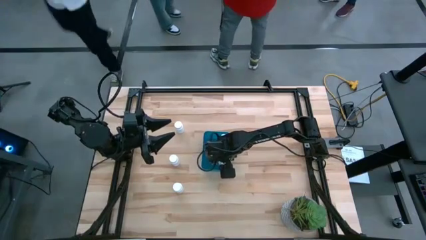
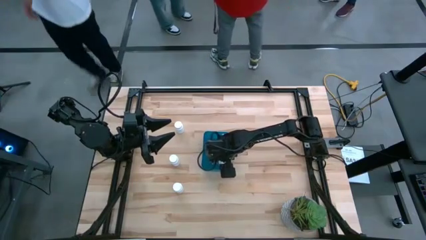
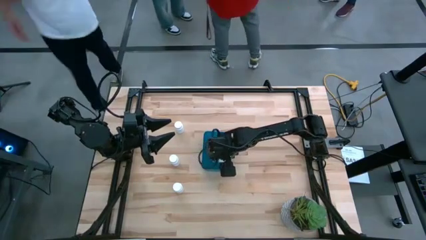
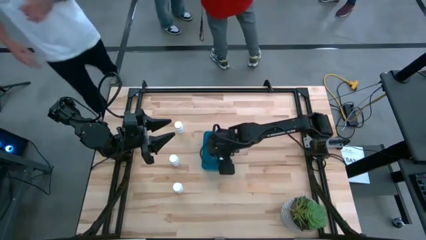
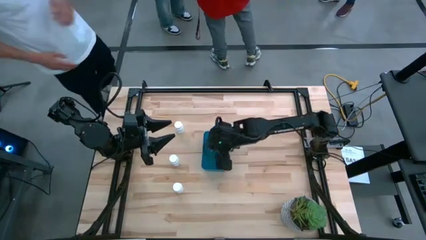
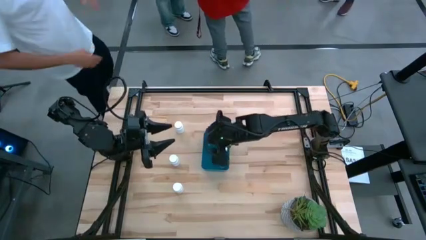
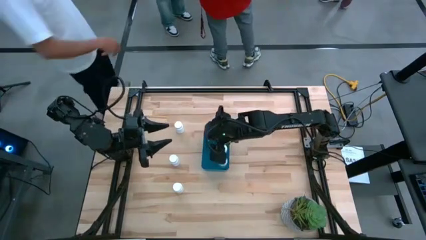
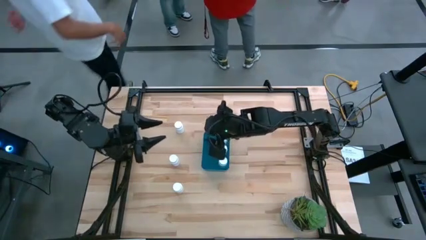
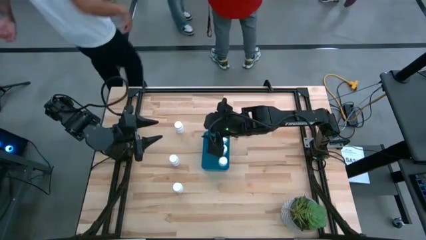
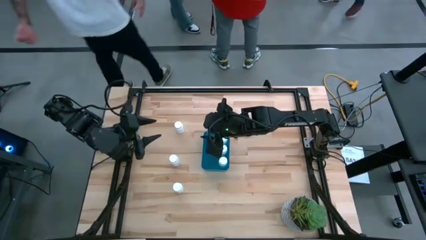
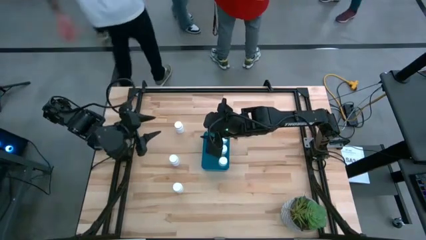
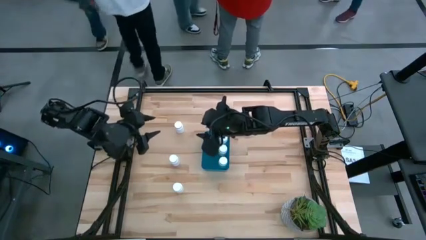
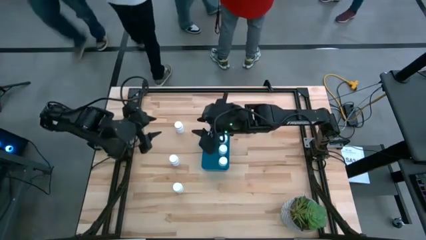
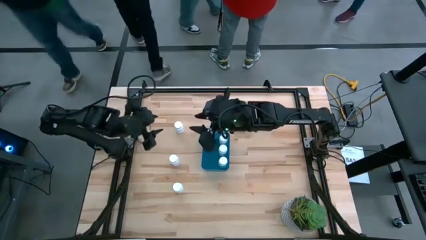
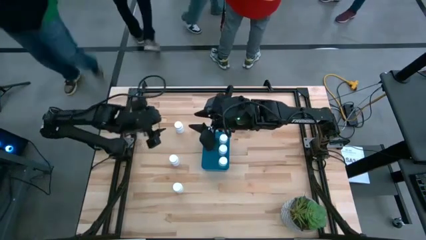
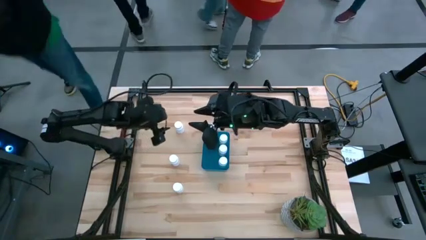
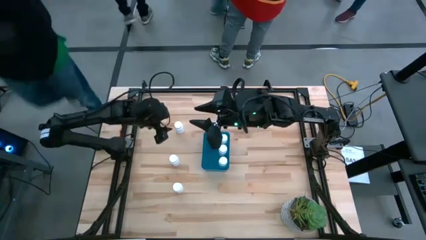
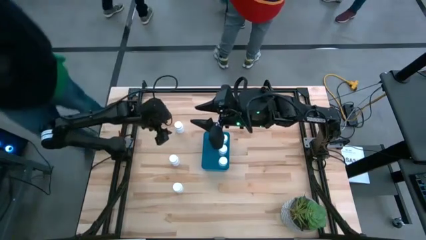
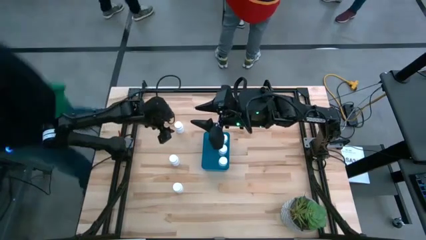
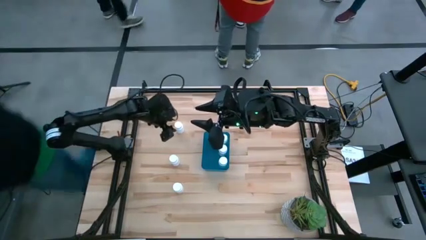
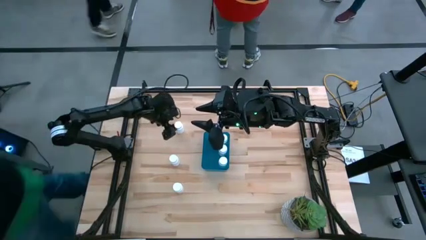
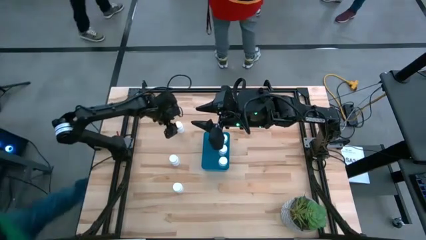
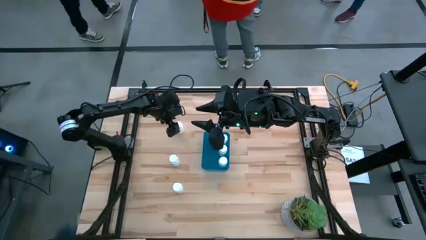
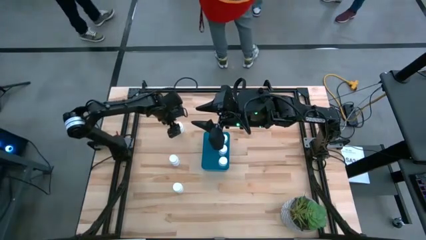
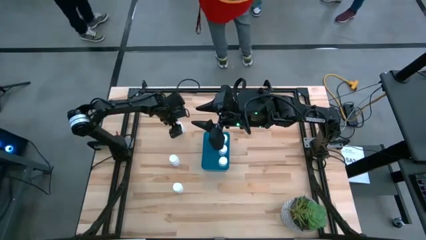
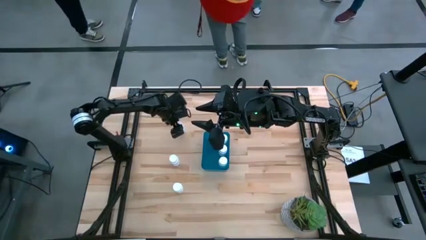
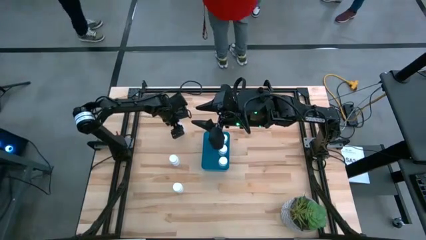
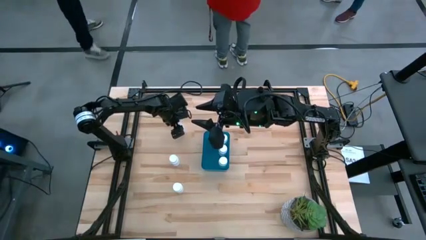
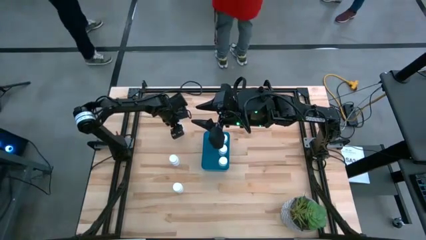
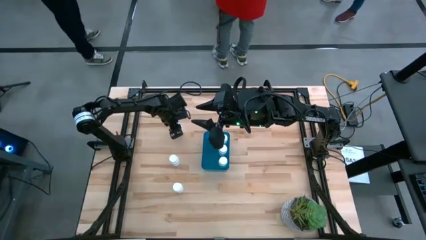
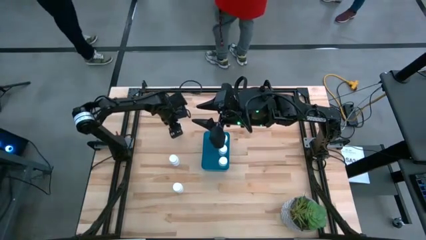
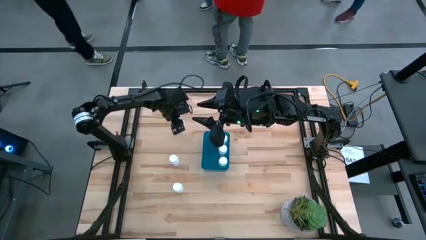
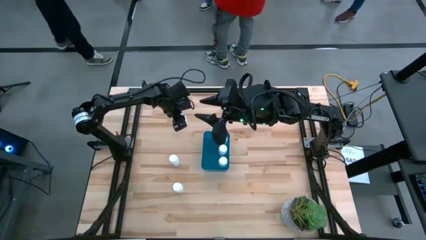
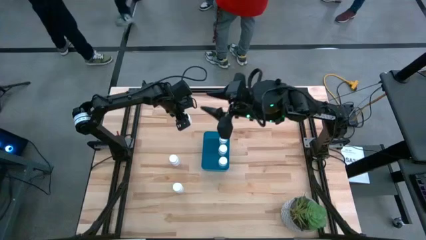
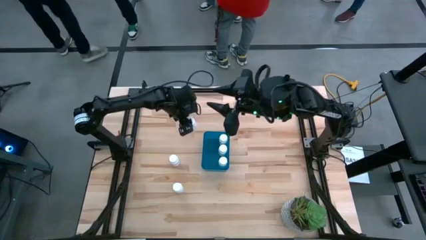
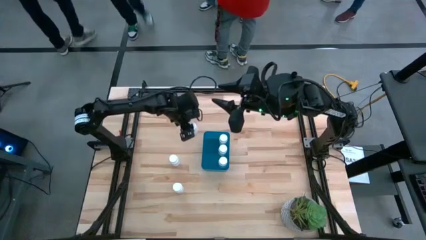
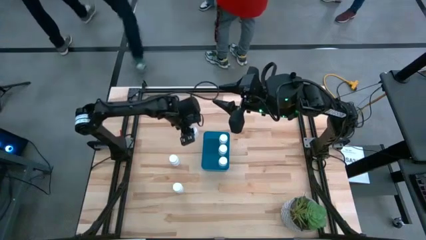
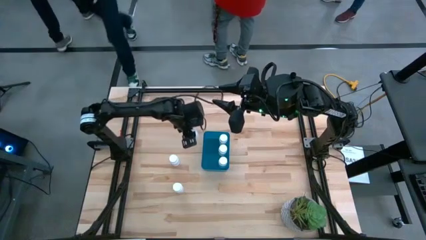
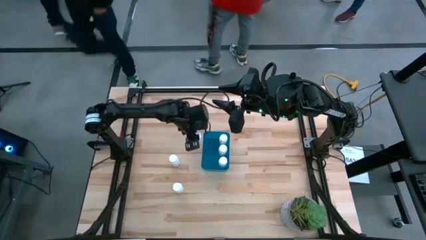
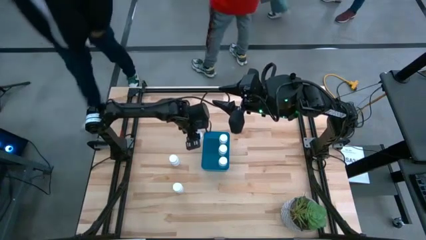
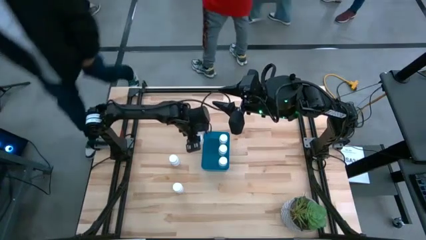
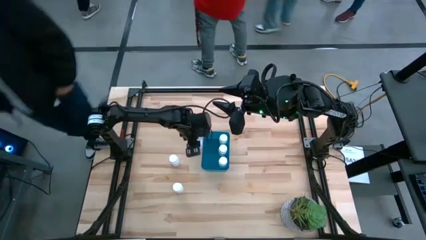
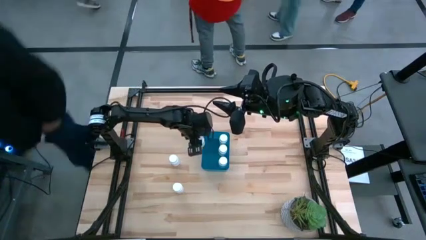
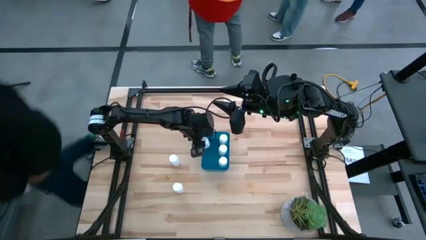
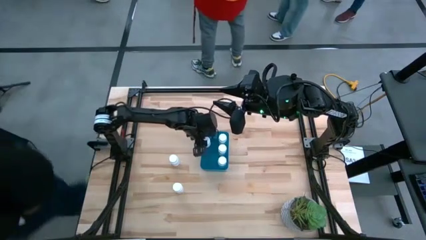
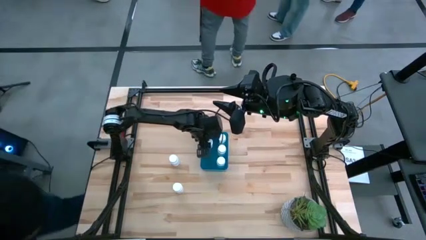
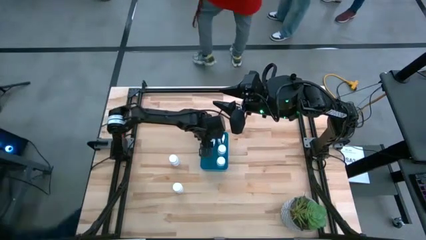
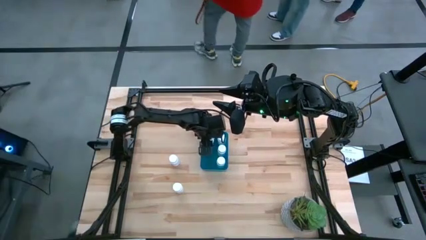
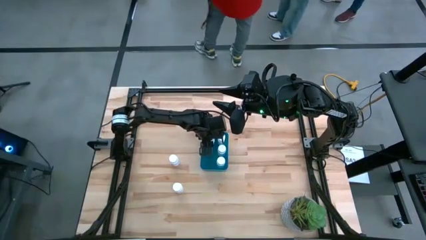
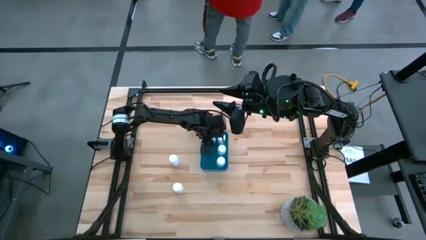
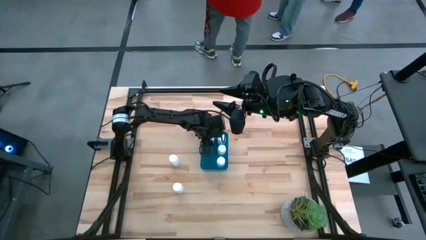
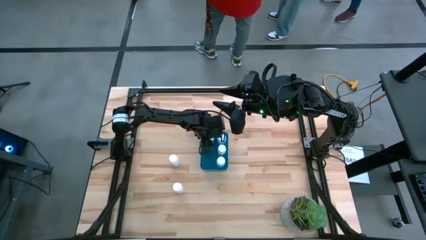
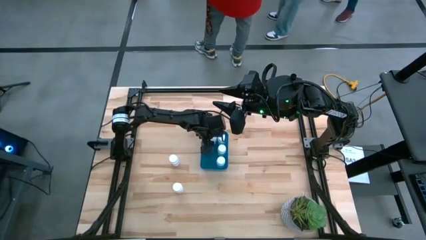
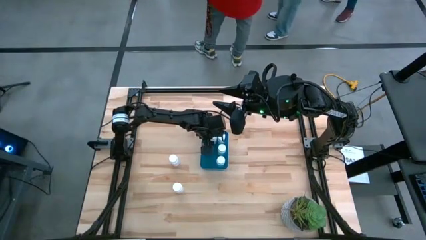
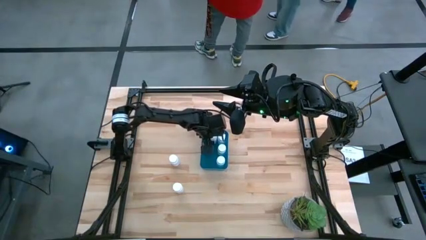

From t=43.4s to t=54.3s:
Task: Pick and place pill bottles into a basket
Put the white medicine bottle into the container

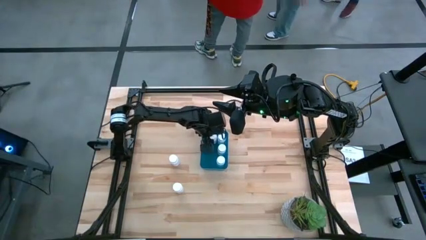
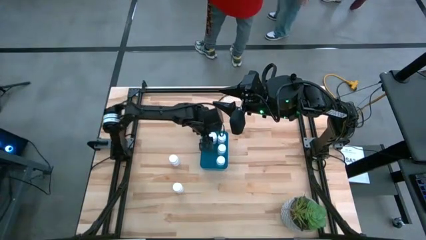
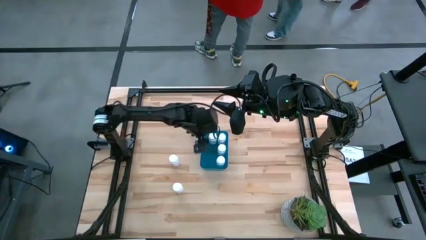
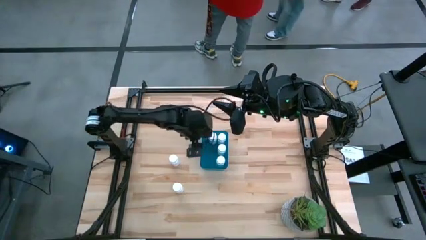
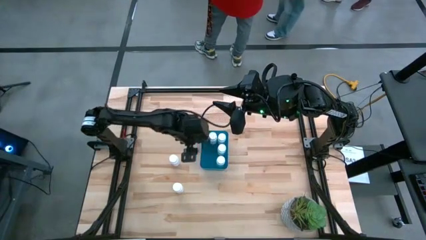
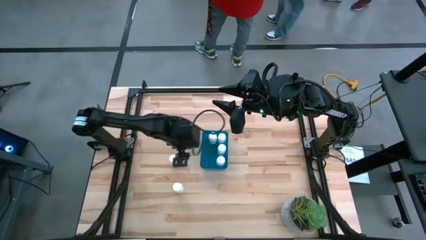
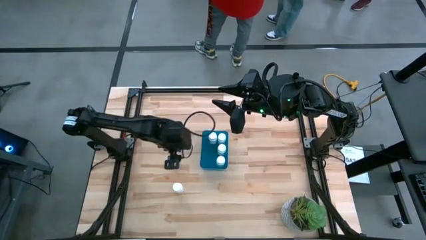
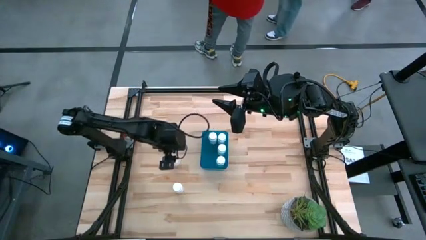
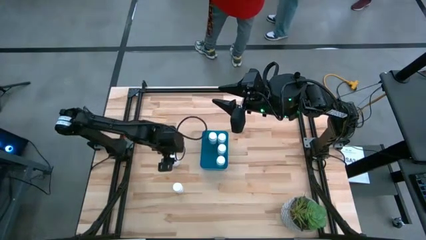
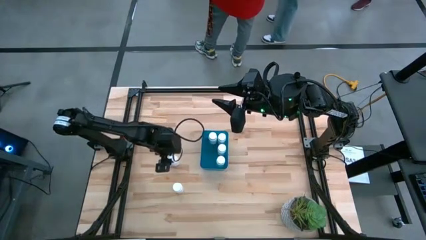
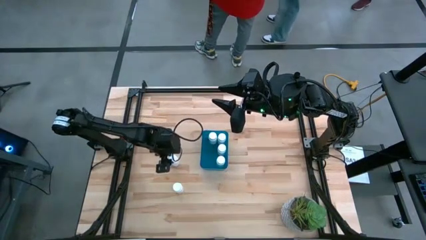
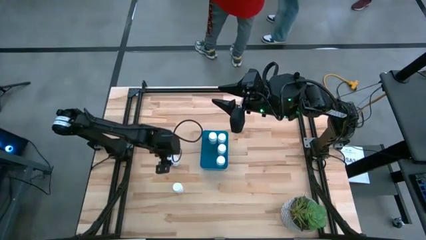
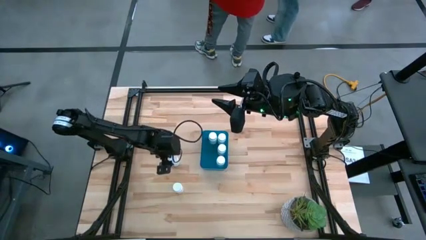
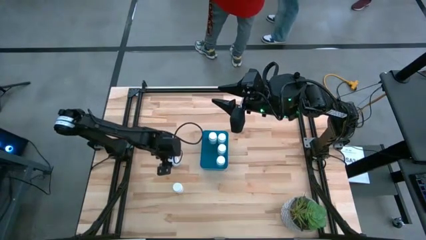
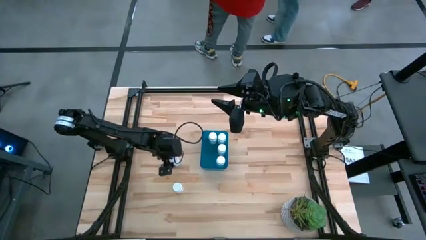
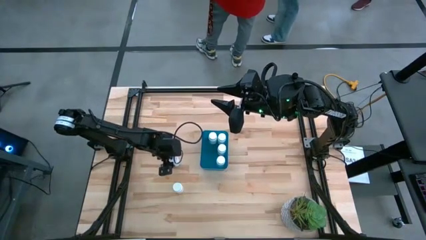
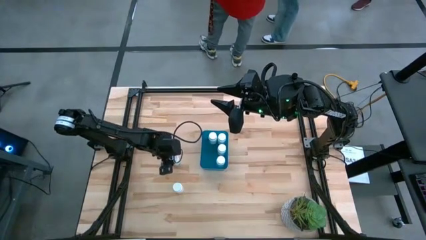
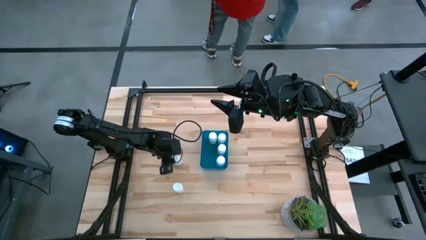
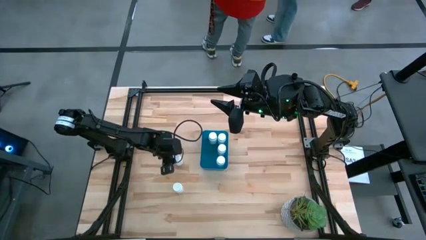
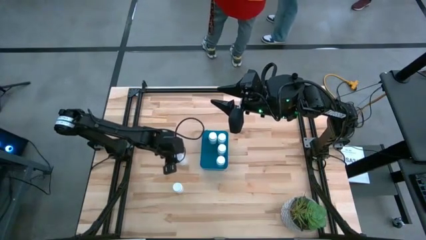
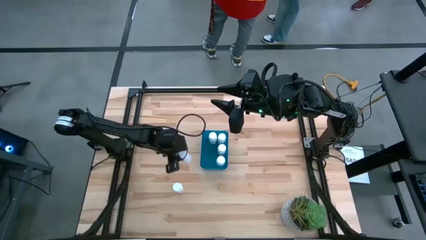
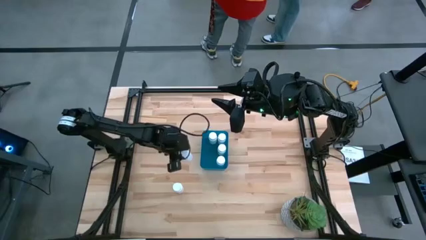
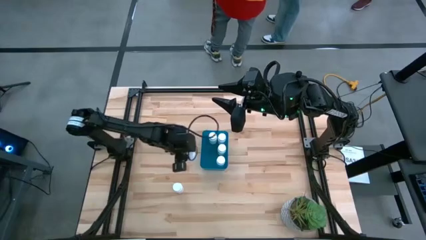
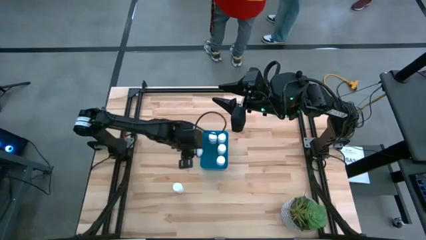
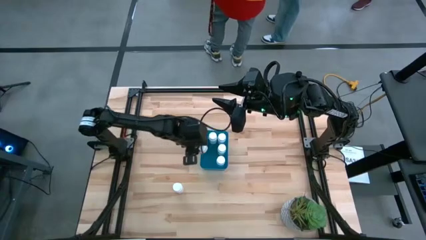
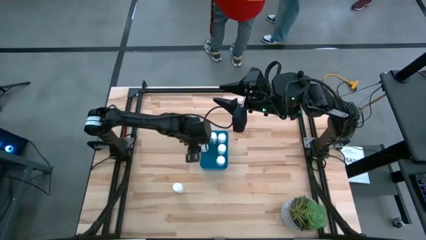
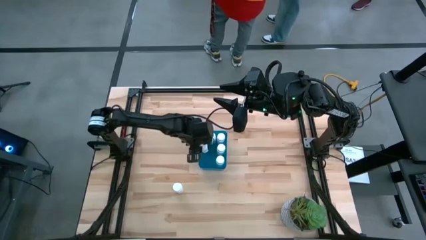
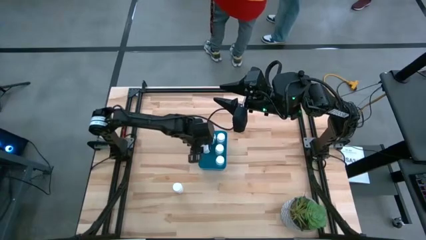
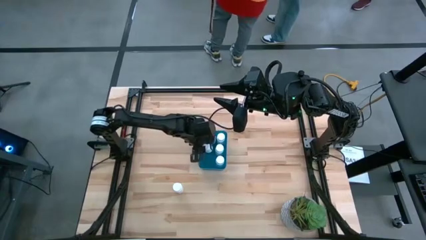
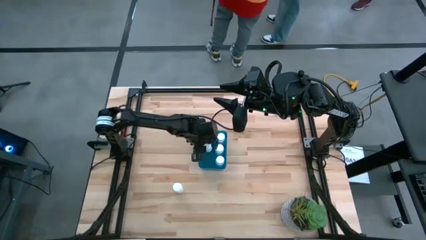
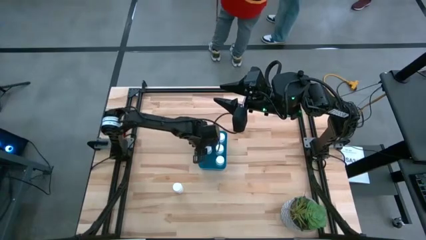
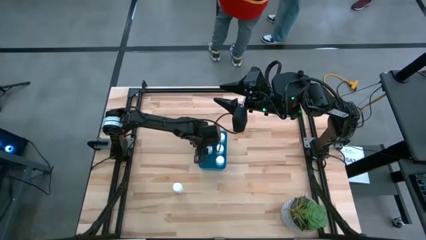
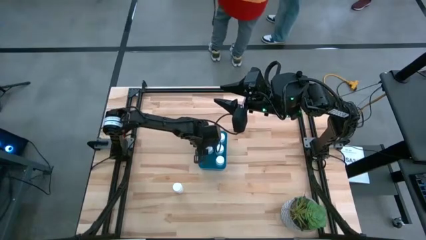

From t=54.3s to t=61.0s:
Put the white medicine bottle into the container
